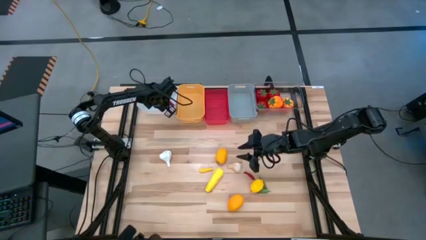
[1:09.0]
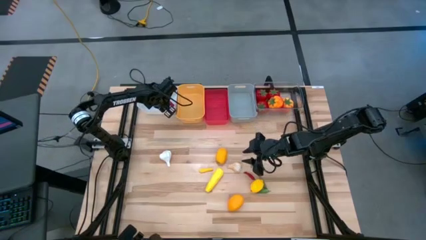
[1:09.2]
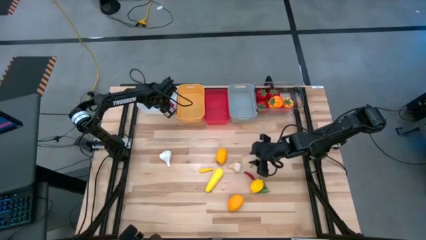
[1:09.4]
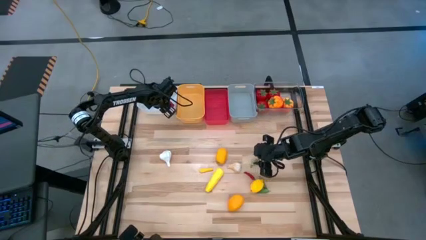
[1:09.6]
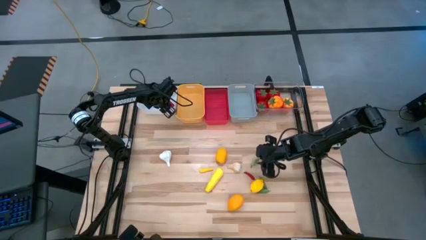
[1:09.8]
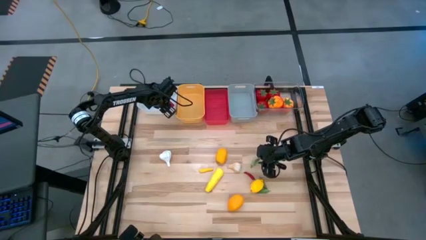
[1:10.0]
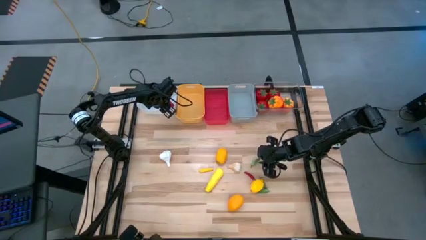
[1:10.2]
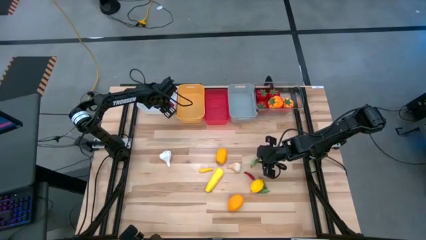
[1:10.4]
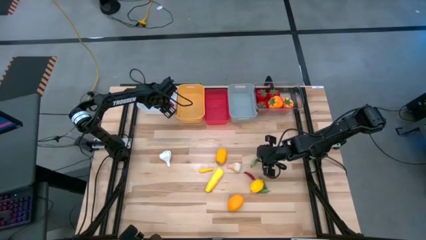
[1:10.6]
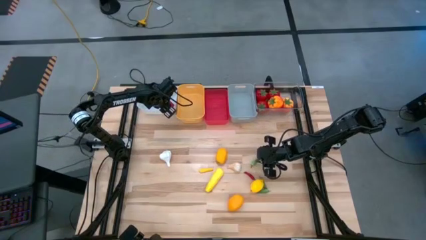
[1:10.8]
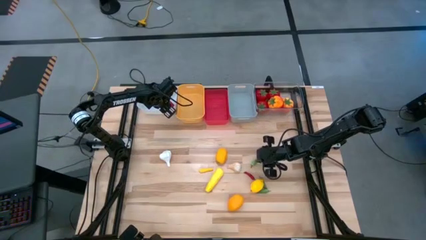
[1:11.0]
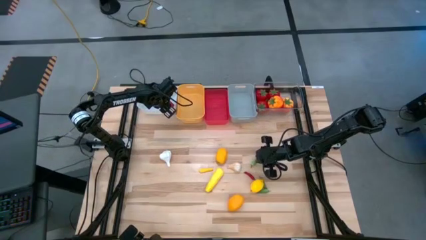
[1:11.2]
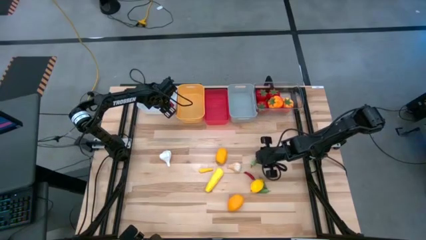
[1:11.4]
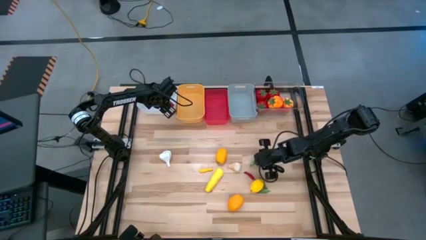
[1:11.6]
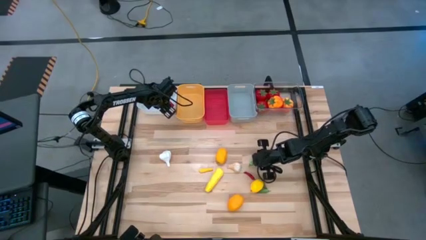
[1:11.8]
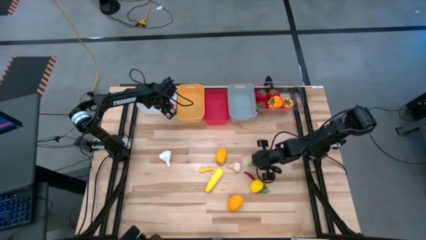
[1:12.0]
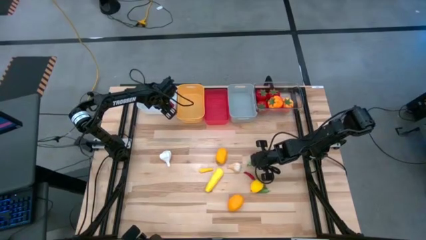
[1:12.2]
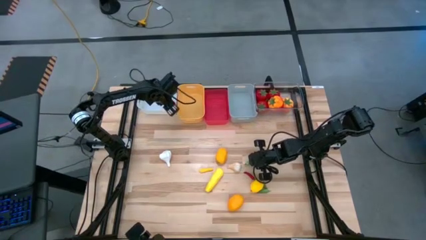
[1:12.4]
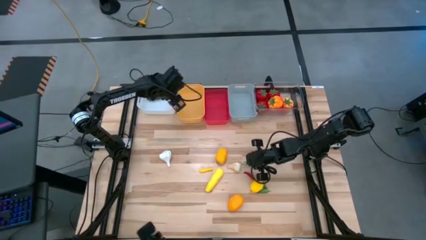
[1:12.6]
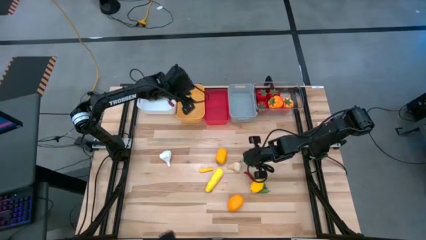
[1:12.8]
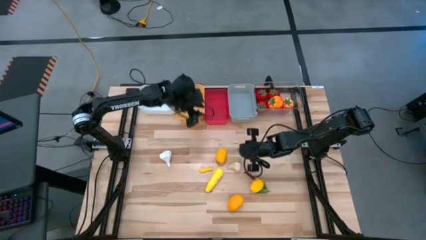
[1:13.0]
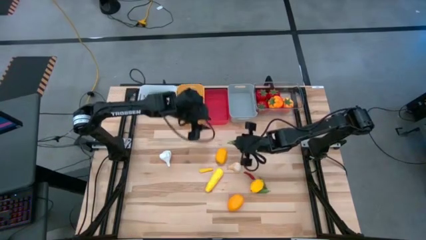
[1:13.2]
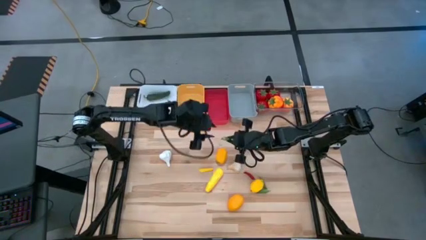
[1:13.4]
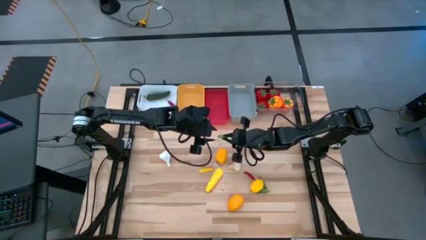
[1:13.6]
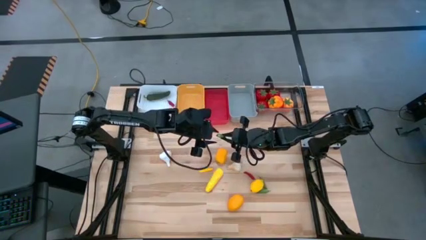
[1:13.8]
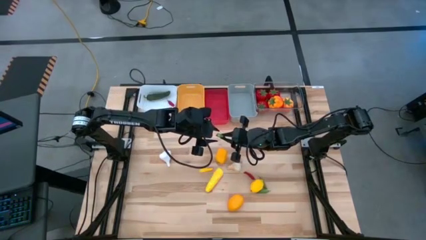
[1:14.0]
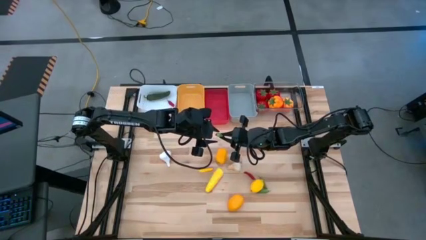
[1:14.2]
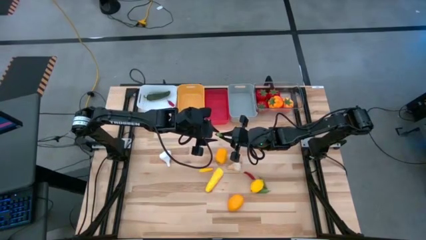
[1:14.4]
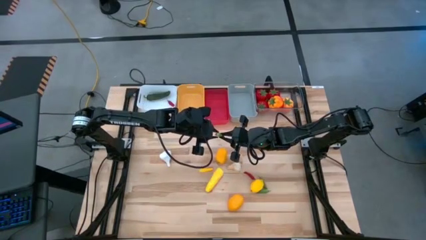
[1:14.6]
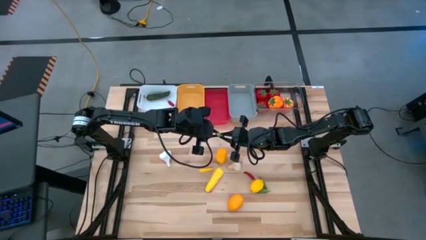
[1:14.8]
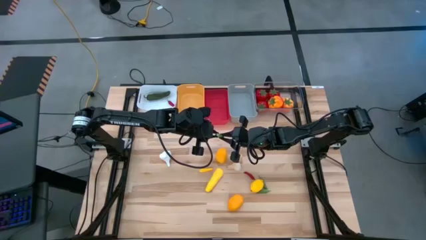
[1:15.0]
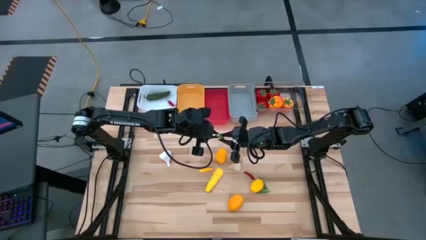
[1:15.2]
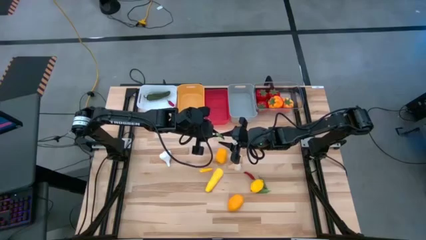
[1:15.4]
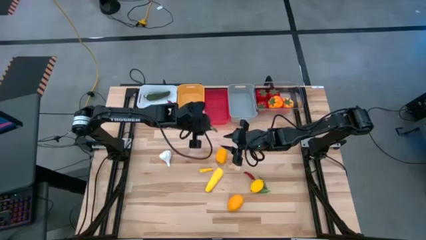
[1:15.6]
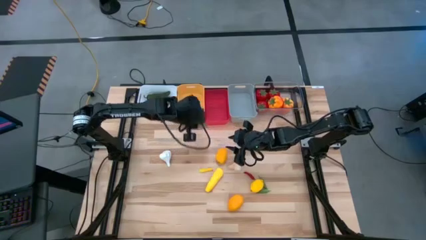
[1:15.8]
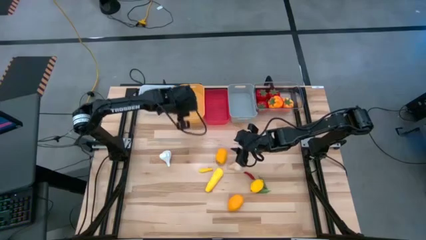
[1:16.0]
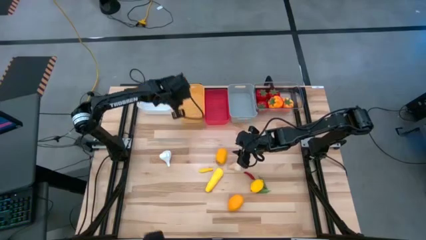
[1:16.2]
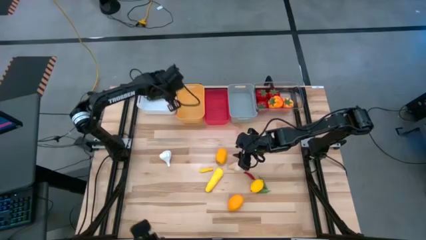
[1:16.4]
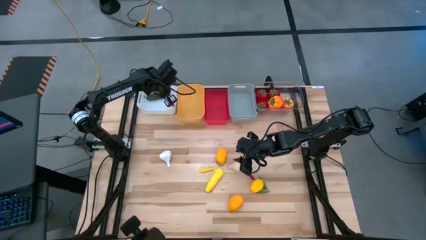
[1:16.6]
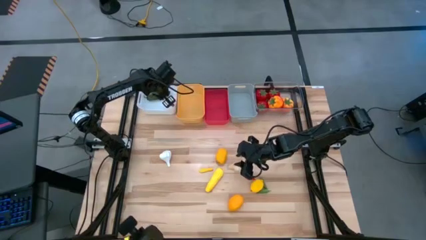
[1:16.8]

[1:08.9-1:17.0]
Task: Sort produce into baskets
Put the green chili pepper into the white bin

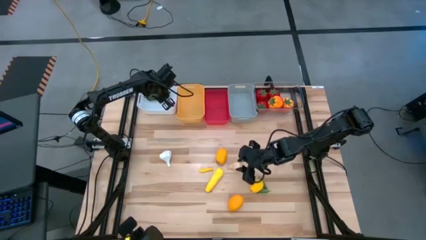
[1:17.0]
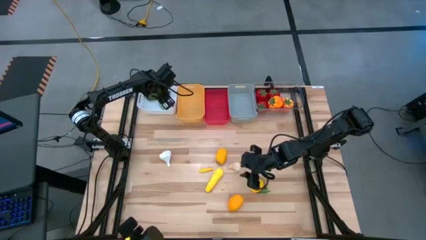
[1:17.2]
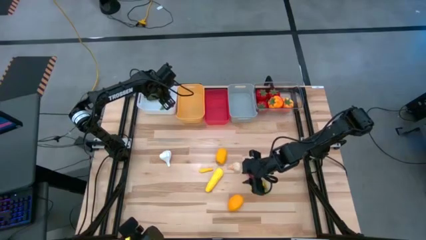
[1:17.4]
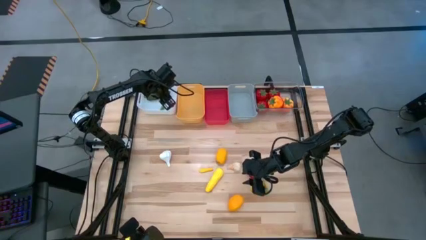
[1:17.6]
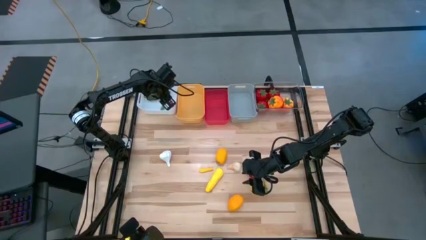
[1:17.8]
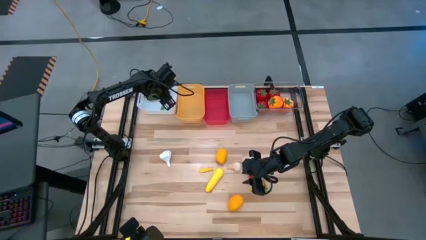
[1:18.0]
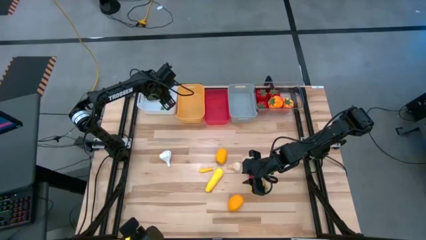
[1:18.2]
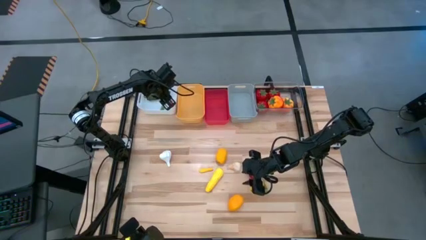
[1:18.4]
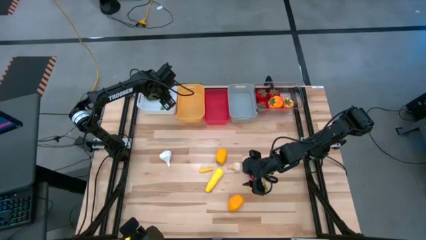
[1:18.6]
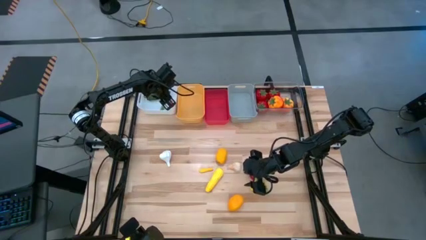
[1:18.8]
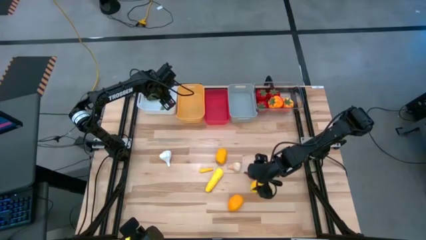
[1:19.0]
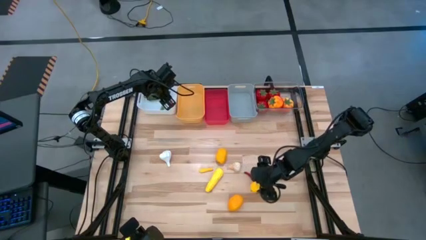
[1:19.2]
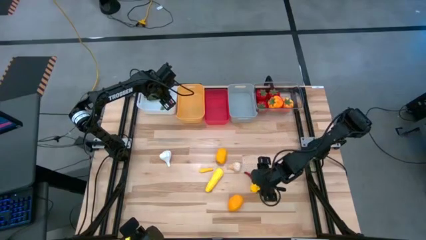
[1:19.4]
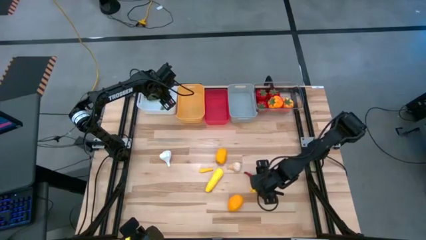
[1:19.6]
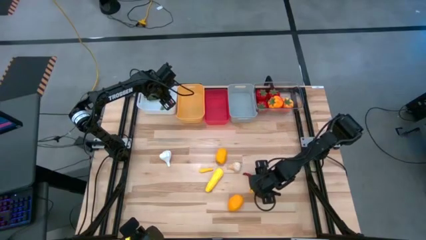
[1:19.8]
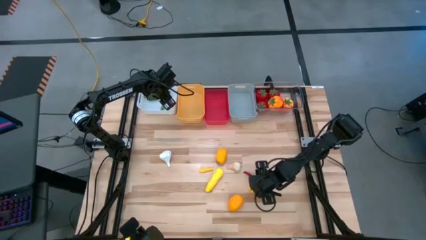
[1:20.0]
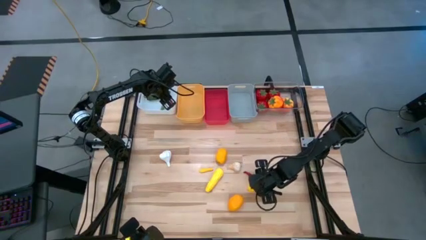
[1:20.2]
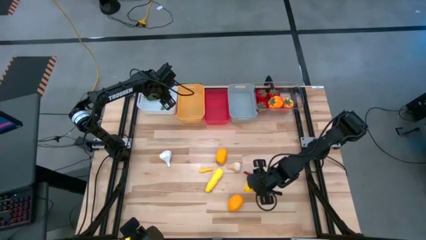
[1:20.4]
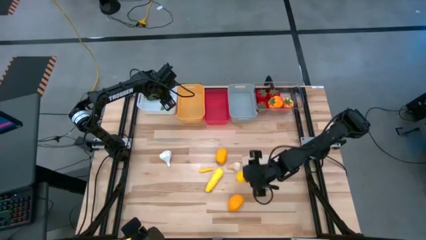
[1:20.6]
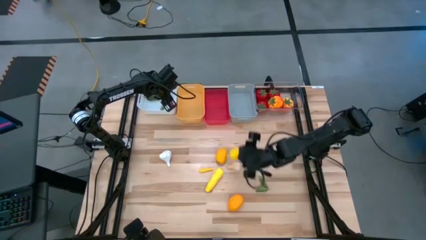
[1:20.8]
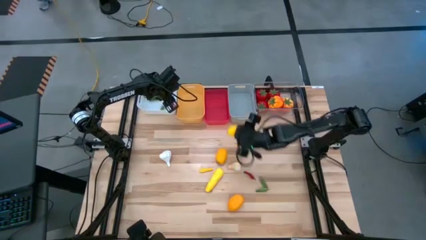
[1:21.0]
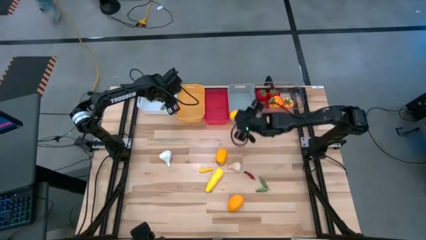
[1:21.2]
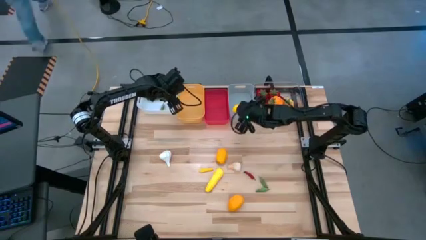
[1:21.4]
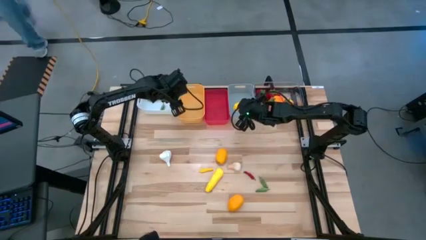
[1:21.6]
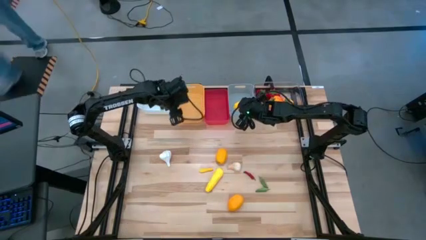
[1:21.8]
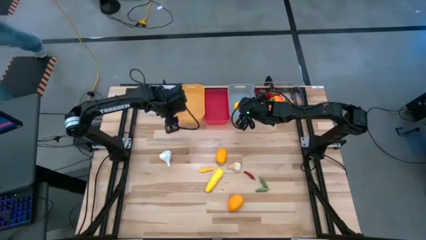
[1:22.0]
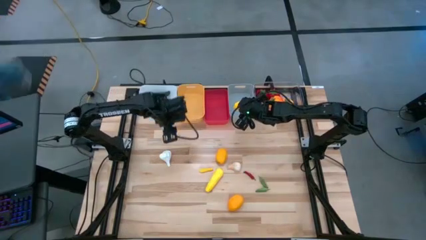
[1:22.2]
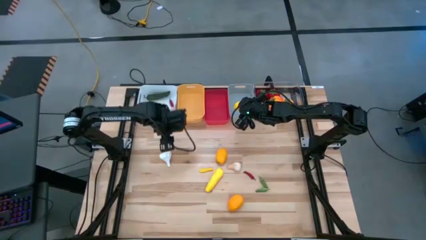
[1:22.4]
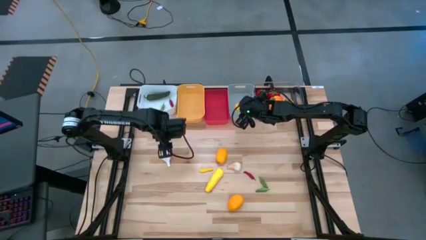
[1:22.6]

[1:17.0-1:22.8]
Put the yellow lemon into the gray bin

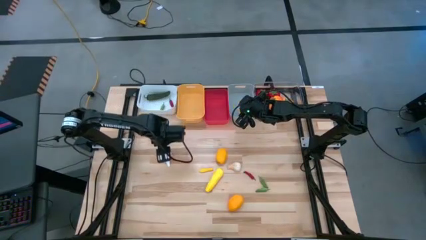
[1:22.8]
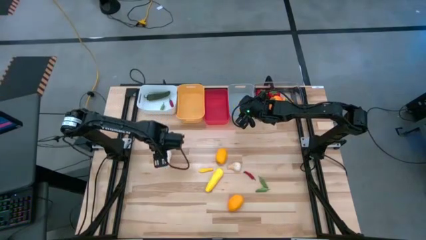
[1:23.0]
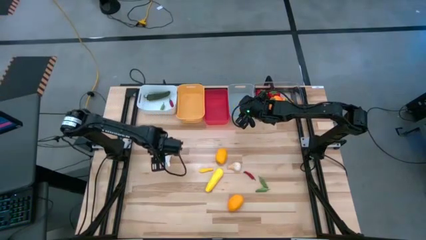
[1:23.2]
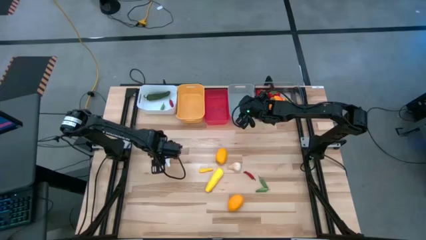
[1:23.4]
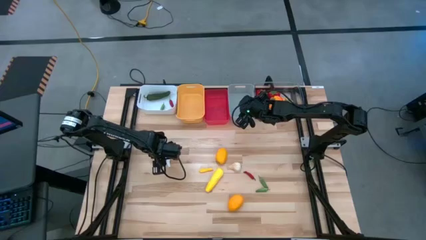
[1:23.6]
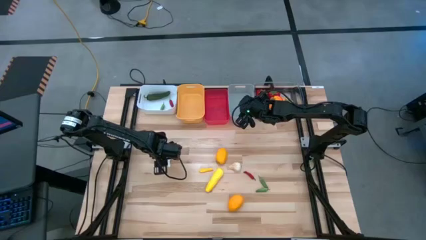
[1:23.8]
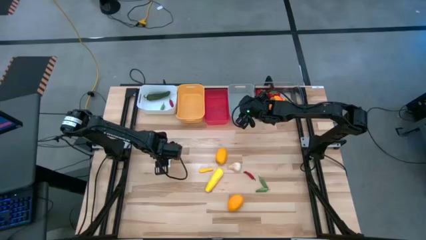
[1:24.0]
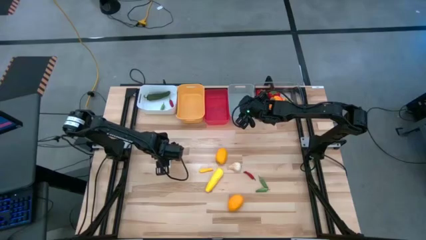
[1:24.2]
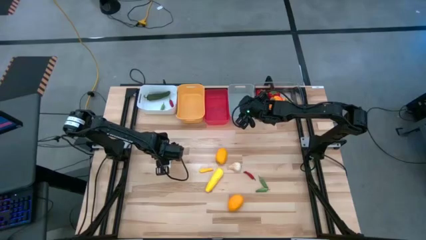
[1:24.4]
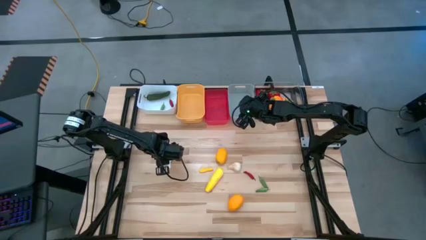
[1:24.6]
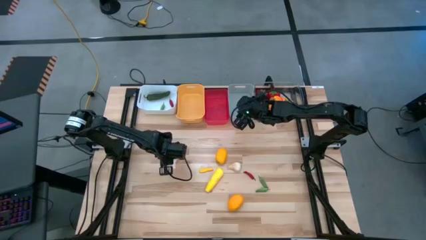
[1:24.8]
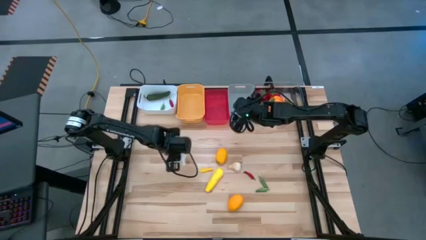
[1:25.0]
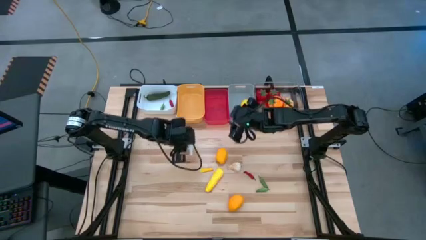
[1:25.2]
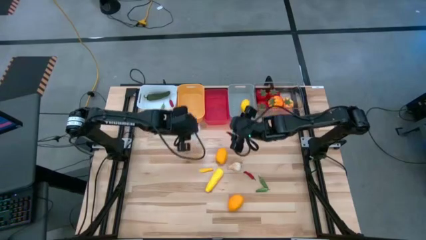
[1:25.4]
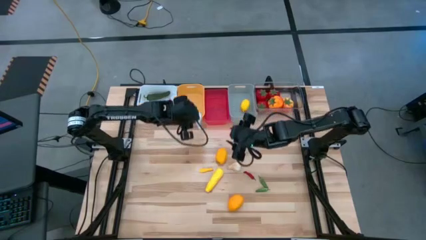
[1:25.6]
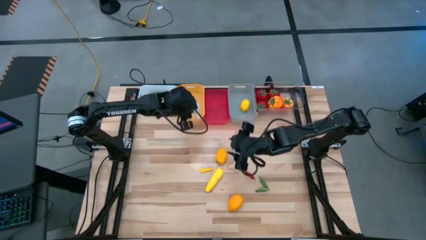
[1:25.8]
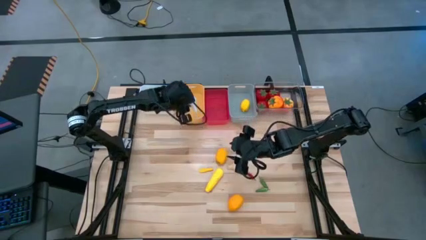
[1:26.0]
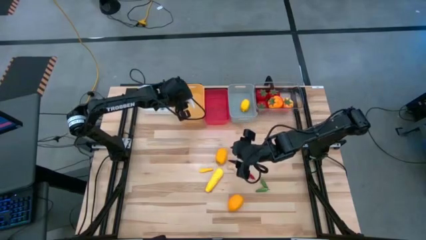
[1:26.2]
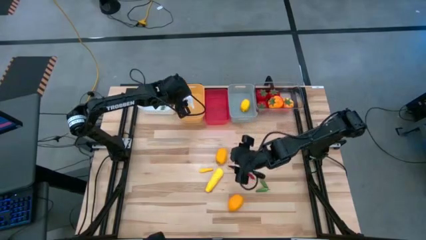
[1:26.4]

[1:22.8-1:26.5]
Put the garlic into the yellow bin

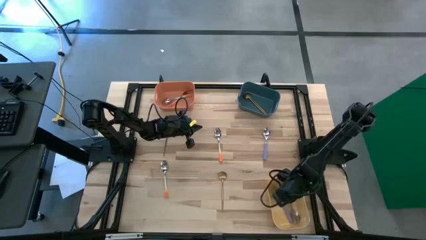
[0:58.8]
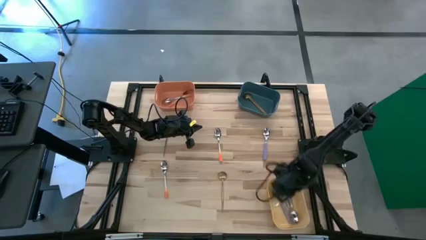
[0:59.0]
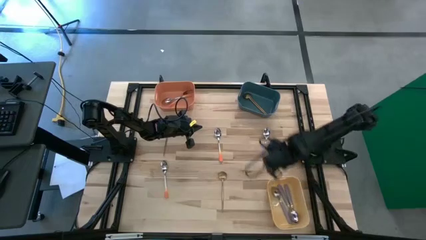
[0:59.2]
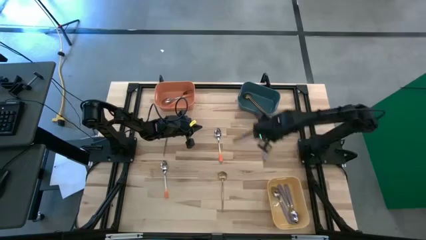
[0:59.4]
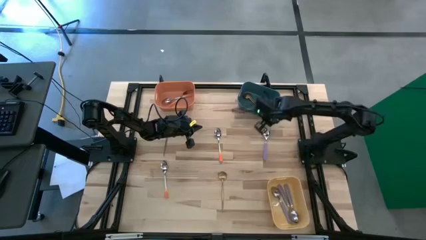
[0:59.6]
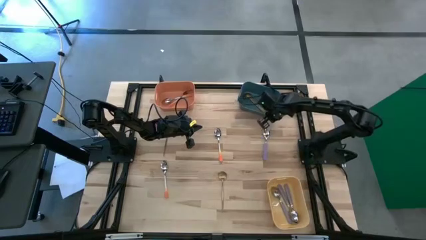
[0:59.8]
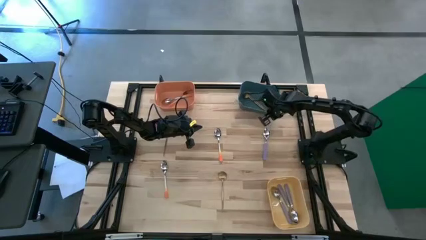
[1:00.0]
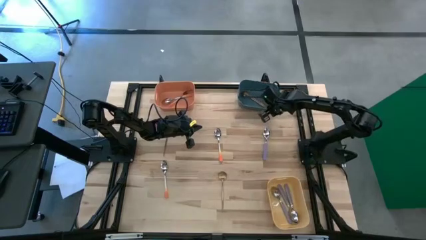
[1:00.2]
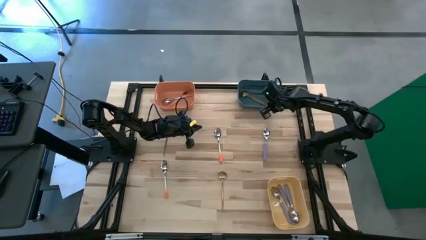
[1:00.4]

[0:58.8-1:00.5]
Task: Sort silverware by color (type)
Adjust the blue bin
